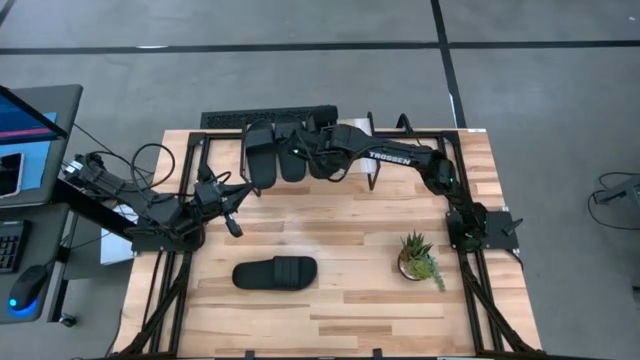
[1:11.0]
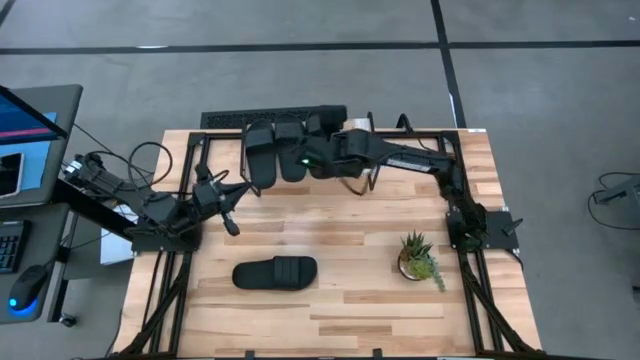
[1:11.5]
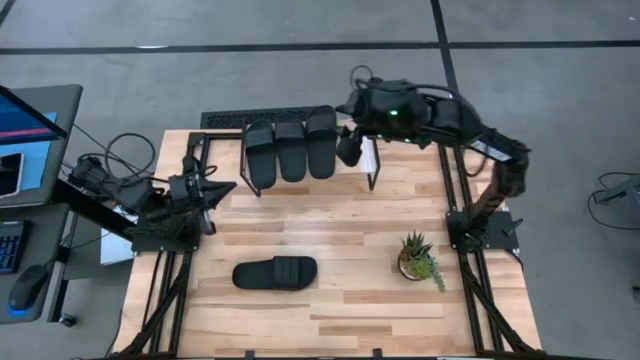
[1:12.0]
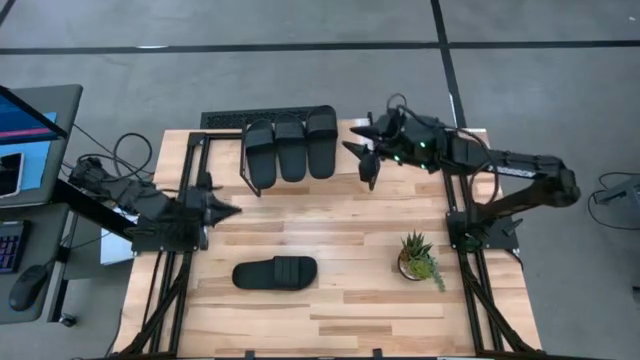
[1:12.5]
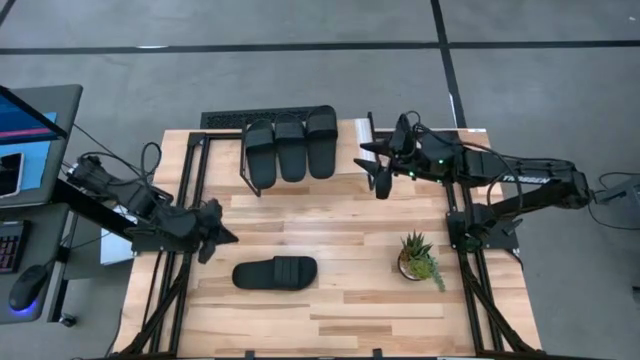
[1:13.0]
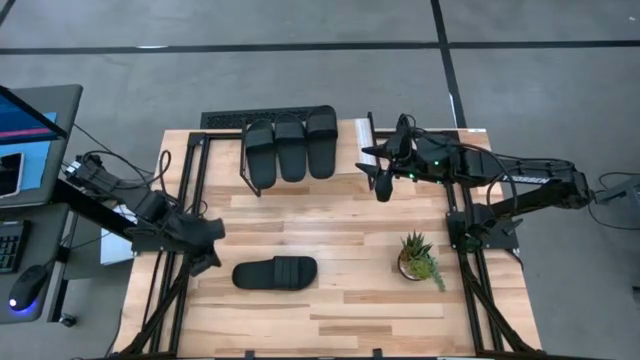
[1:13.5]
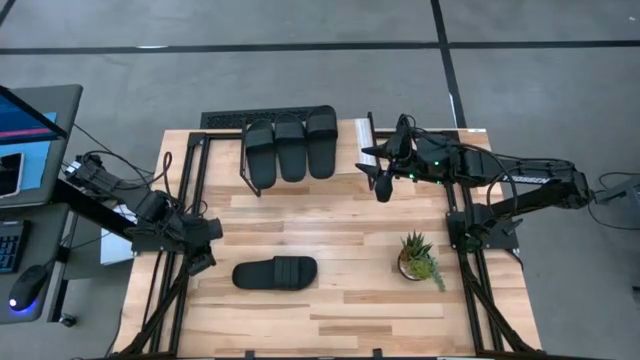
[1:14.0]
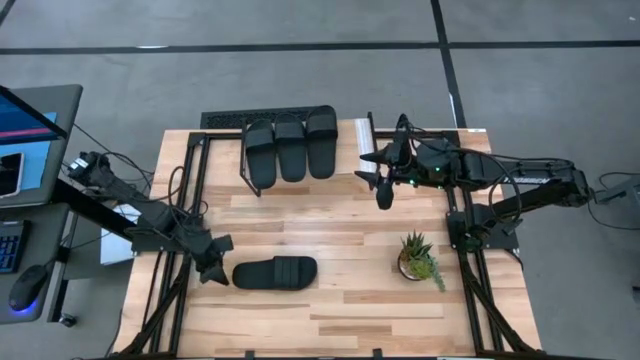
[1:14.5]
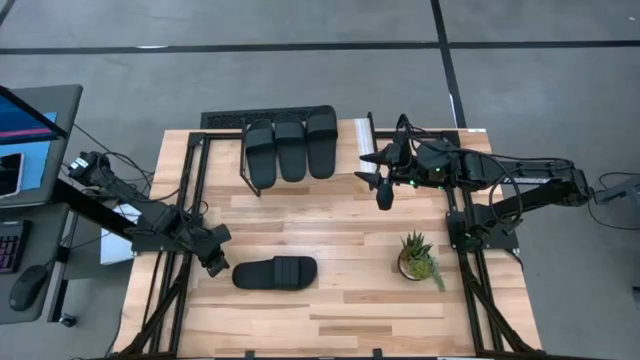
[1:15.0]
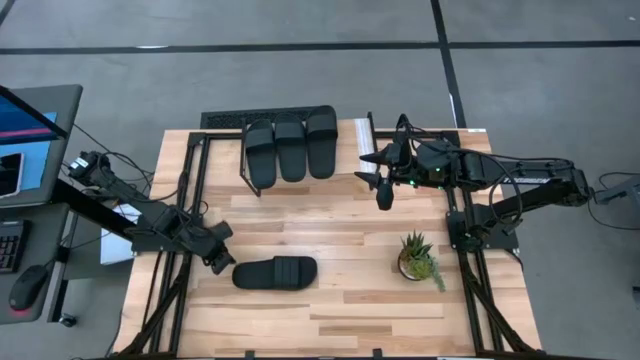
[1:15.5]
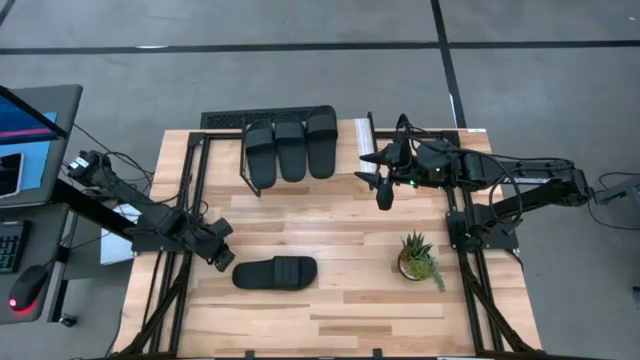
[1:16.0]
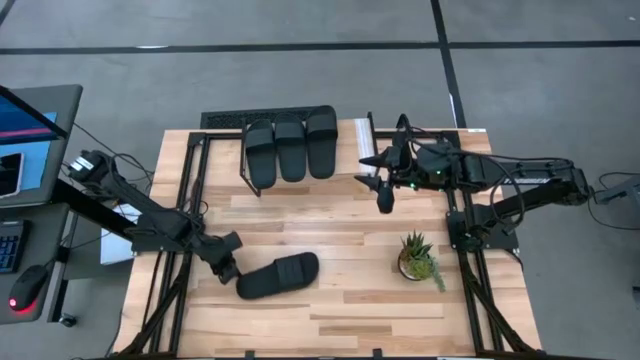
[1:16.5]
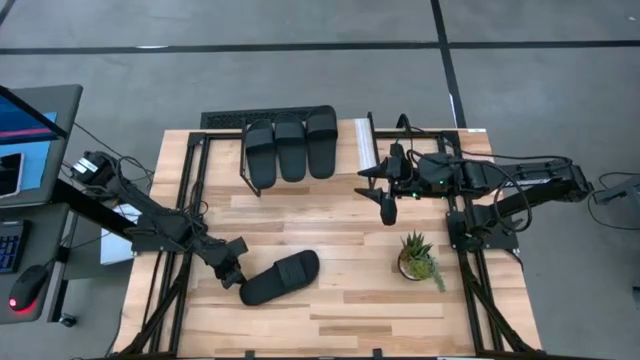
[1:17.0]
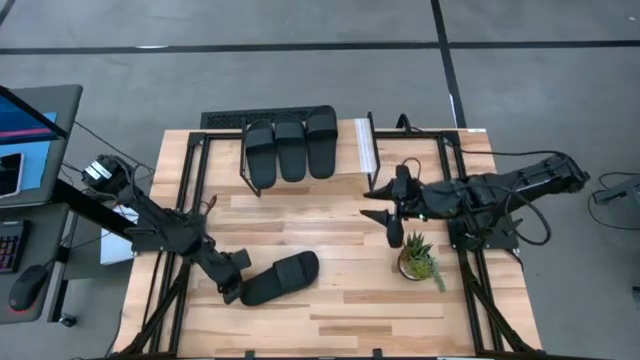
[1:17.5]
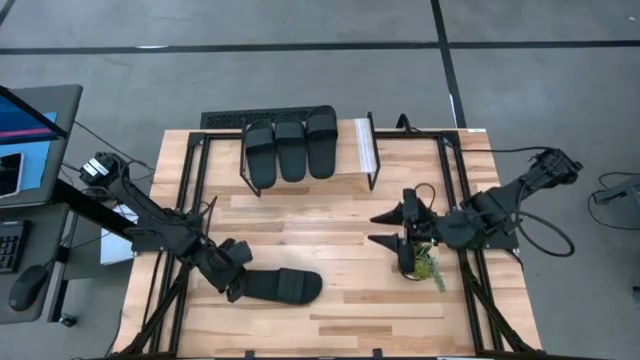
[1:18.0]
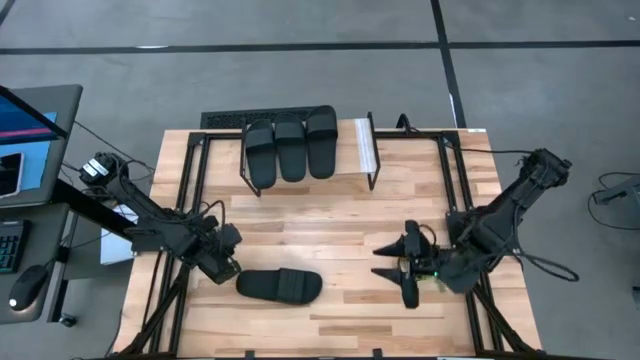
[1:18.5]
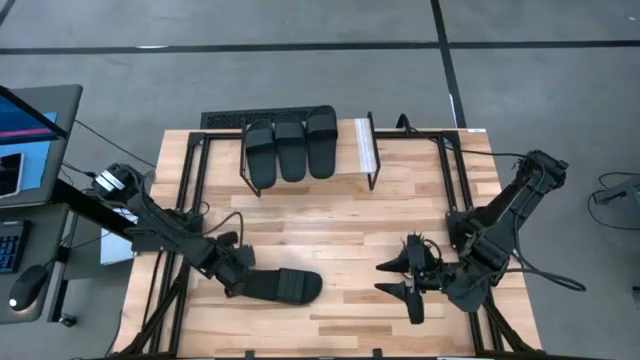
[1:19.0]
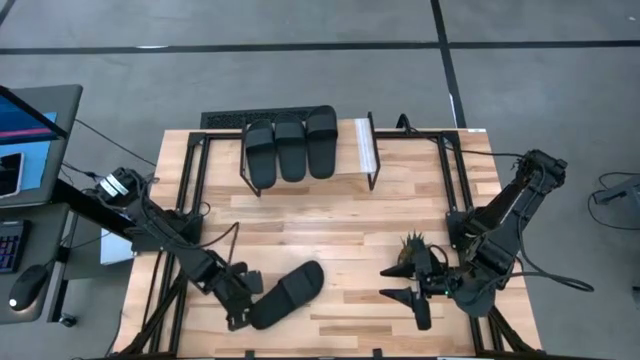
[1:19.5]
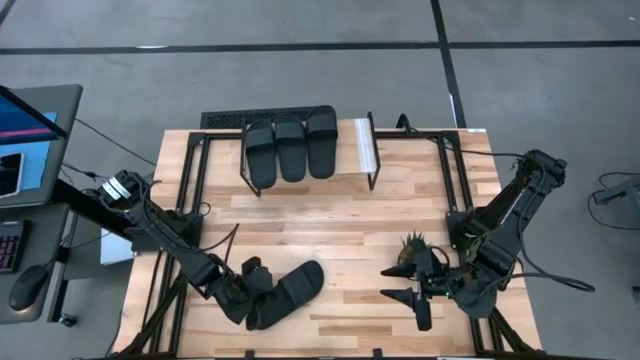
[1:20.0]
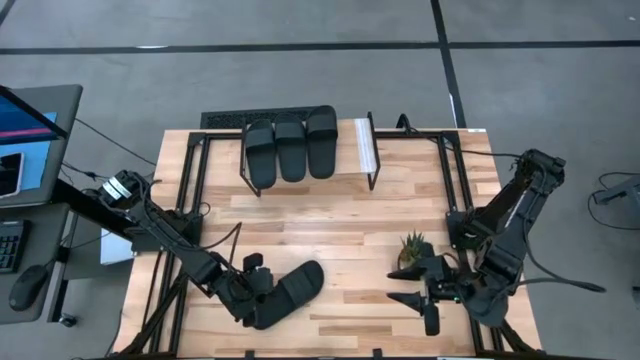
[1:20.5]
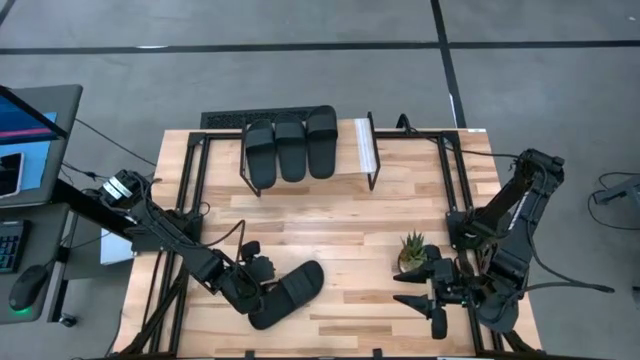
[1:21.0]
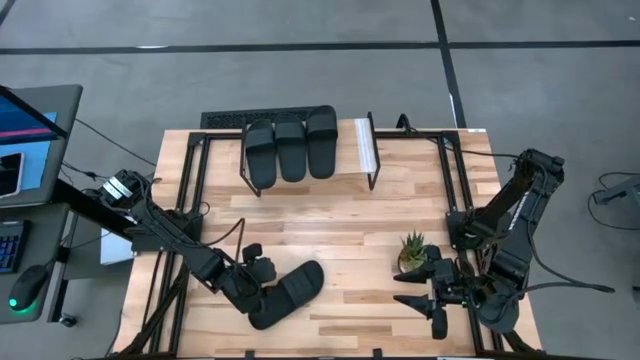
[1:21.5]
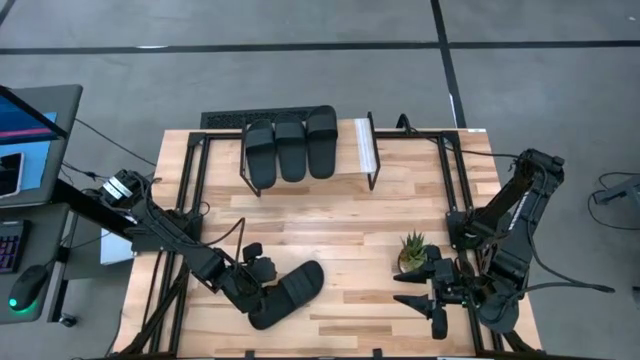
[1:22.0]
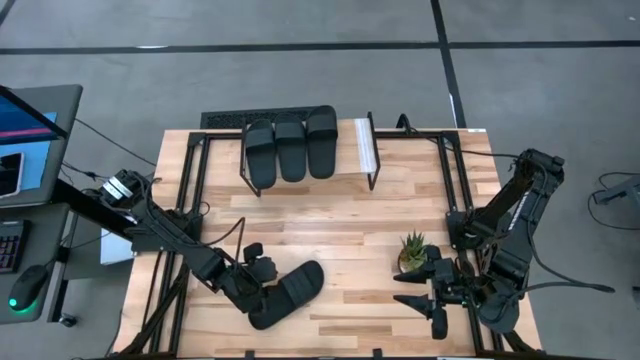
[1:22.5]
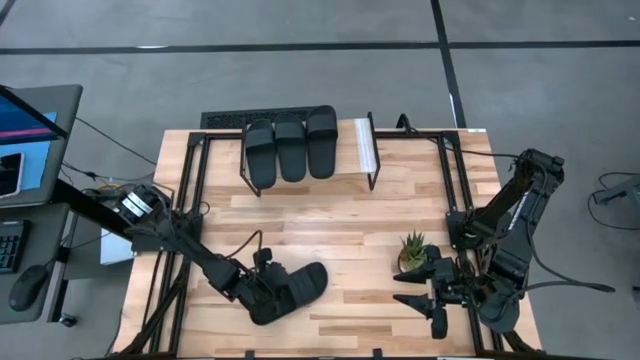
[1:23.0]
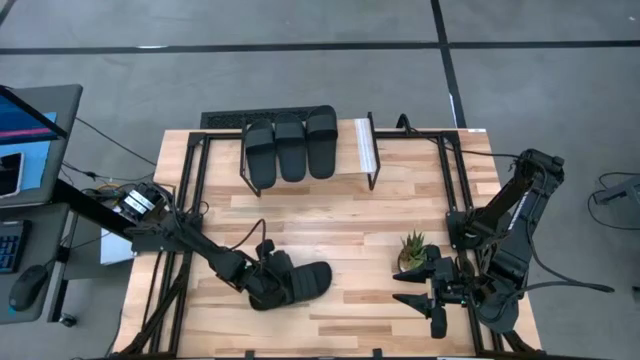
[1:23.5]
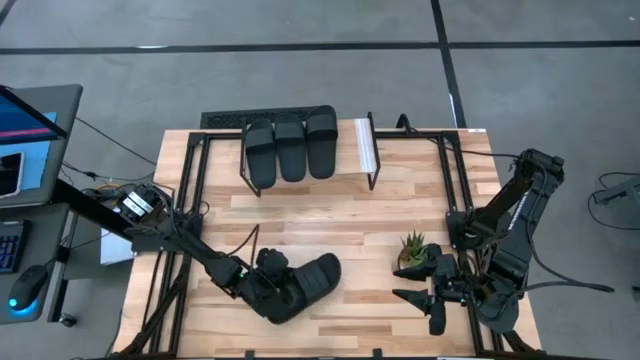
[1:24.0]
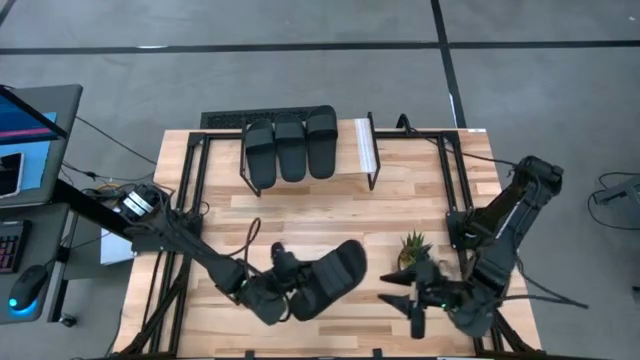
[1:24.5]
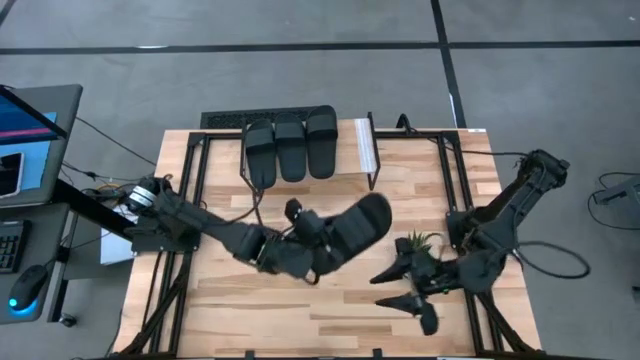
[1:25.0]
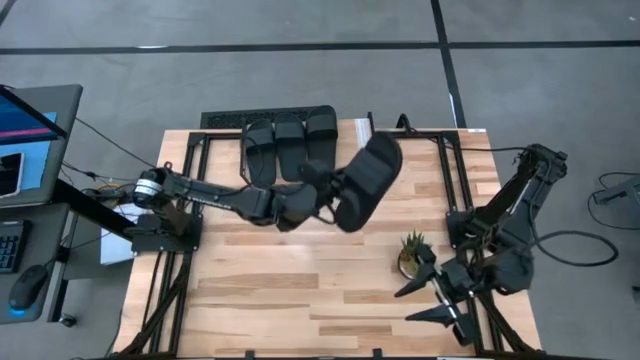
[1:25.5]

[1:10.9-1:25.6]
Task: Pick and place slides into the shelf
Put the black slipper on the shelf

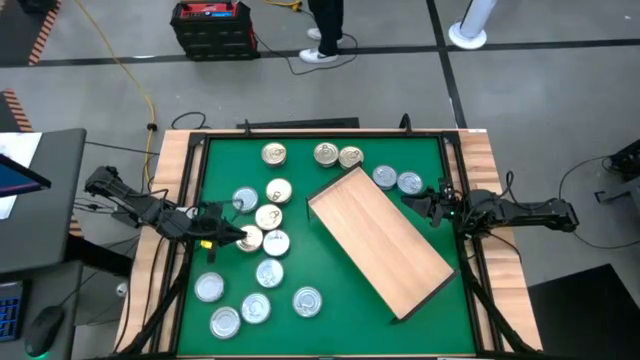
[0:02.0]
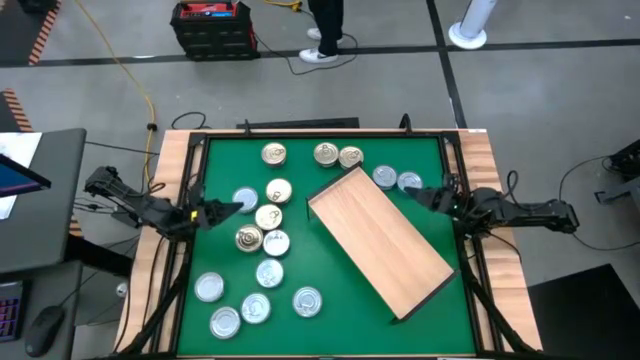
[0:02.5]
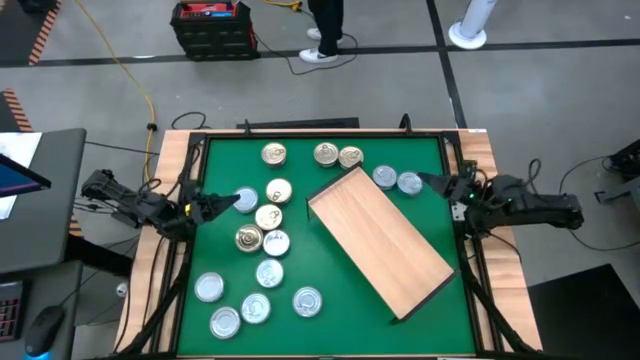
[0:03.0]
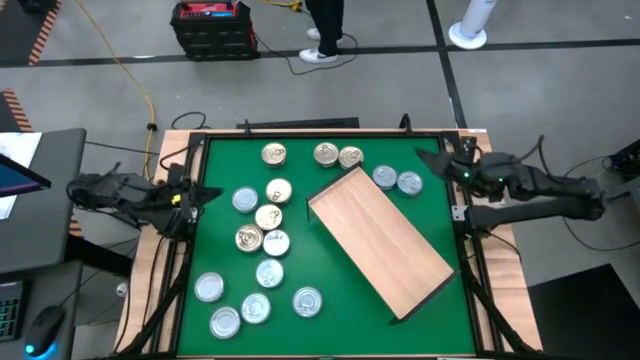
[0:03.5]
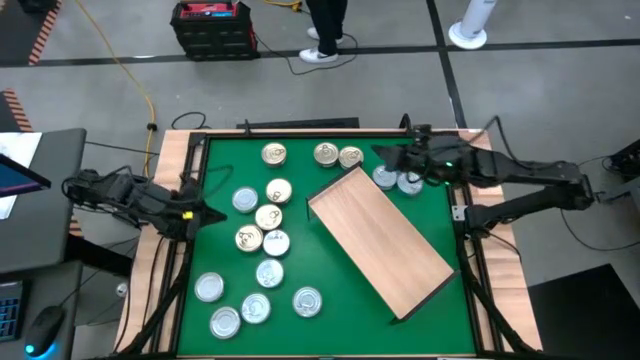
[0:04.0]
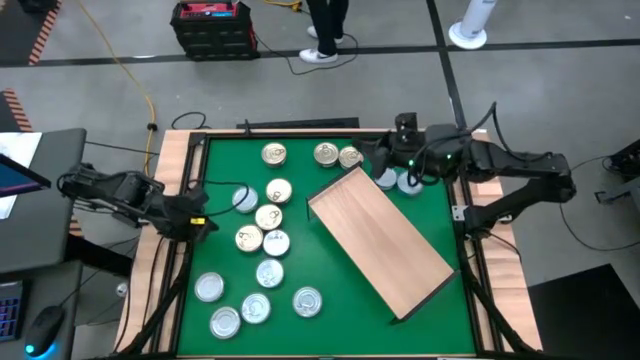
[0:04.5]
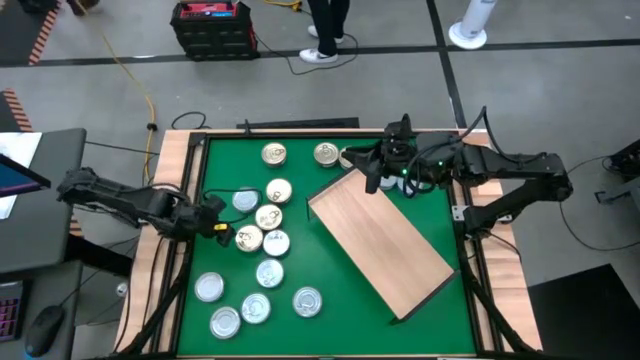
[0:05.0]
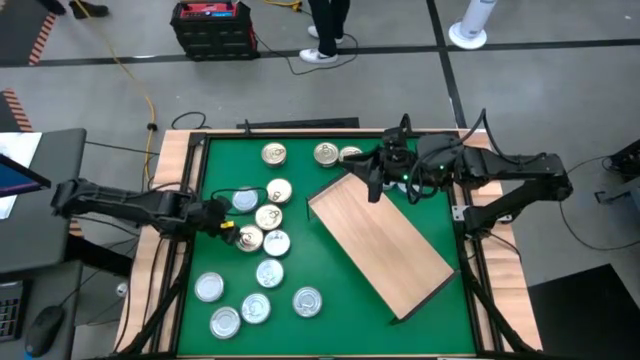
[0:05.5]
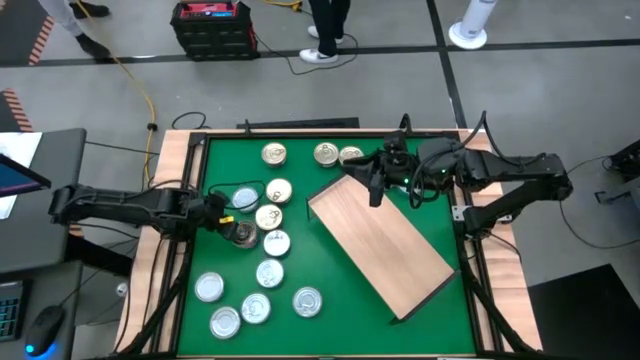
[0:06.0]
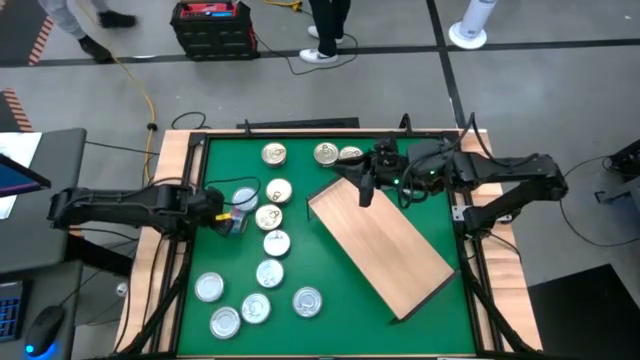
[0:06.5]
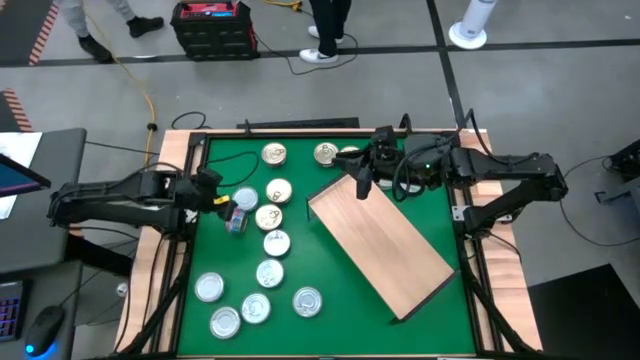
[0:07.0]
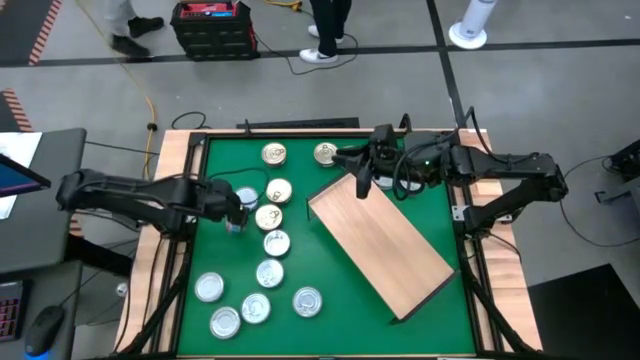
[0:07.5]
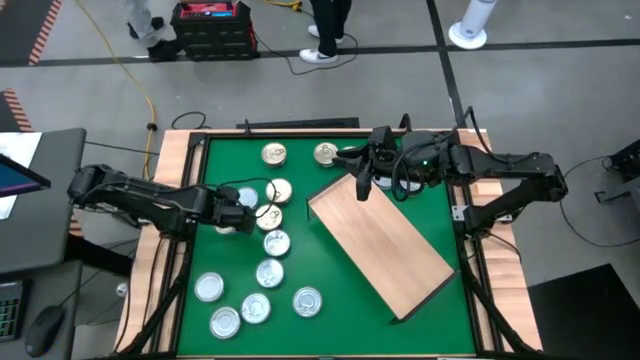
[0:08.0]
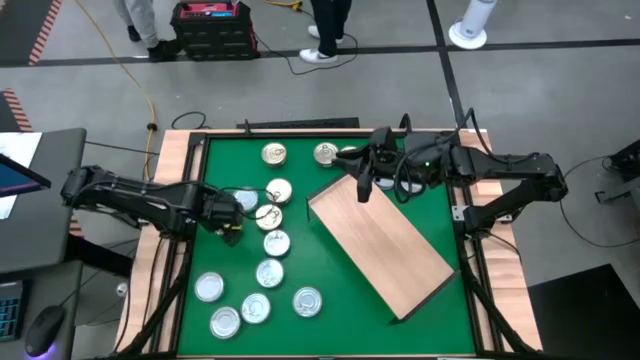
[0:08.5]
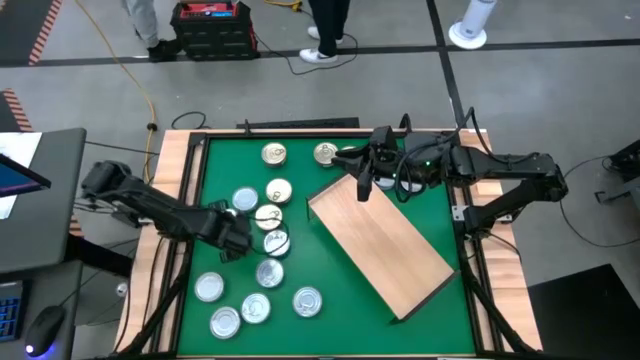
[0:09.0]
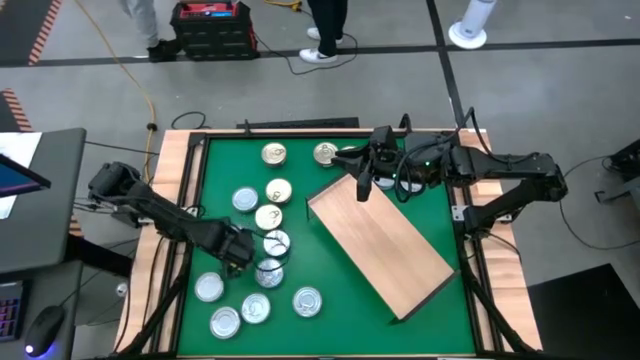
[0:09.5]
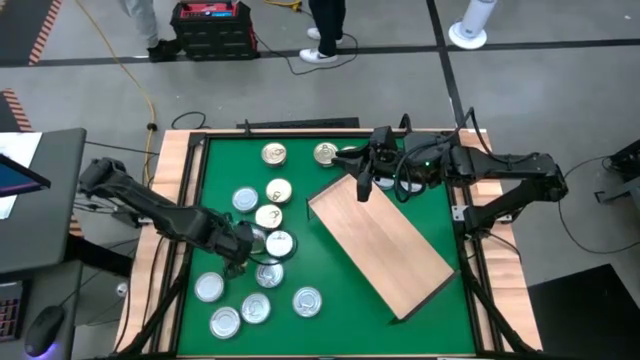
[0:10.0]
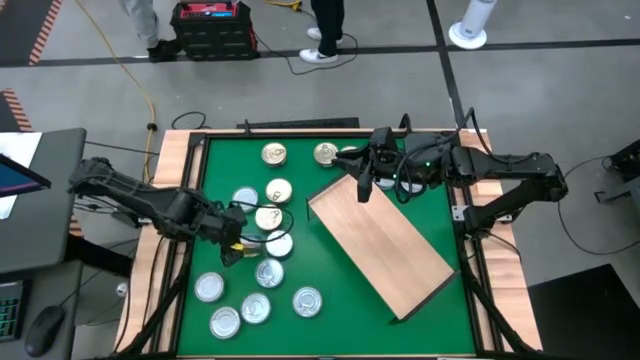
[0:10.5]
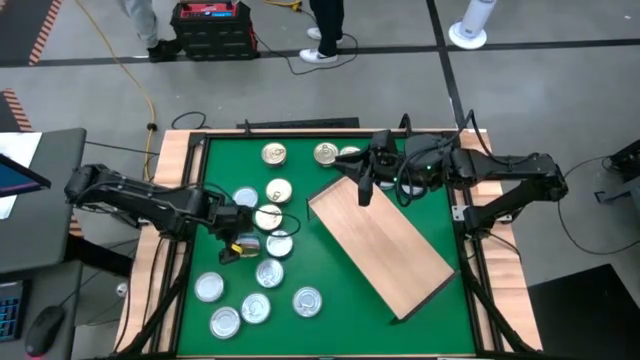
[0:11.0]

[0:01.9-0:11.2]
Task: Stack canned seafood by type on shelf
Put the blue and pink tuna can on the shelf
